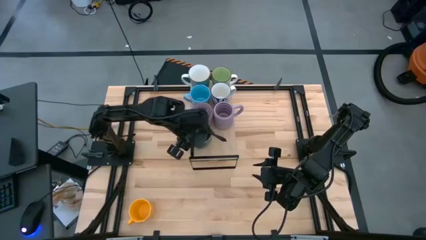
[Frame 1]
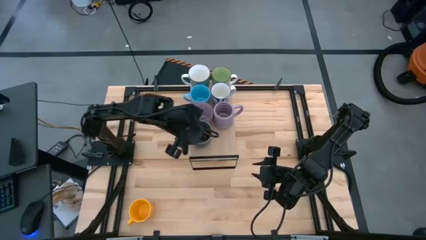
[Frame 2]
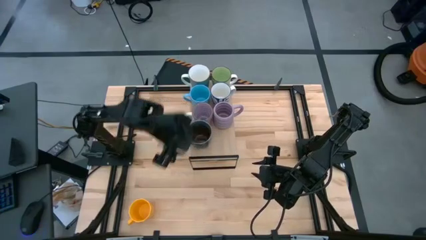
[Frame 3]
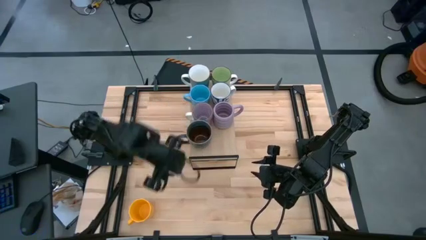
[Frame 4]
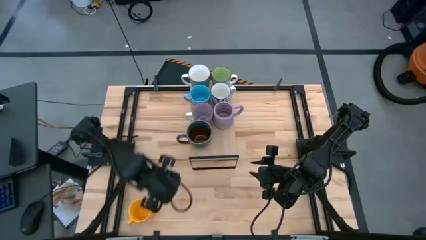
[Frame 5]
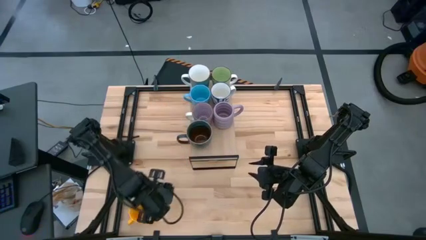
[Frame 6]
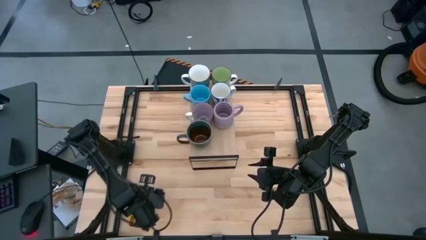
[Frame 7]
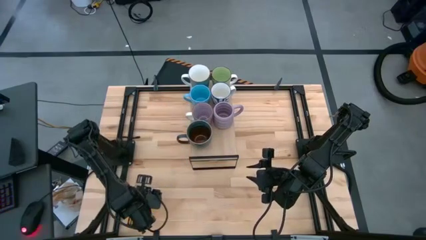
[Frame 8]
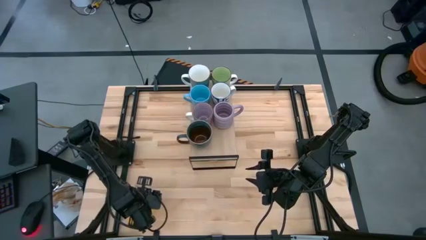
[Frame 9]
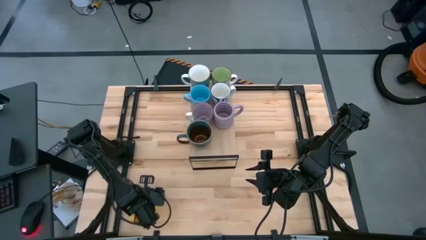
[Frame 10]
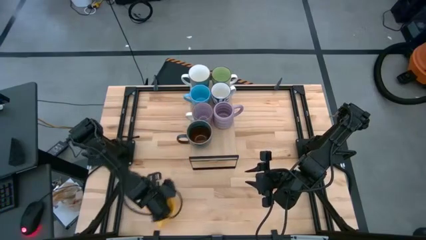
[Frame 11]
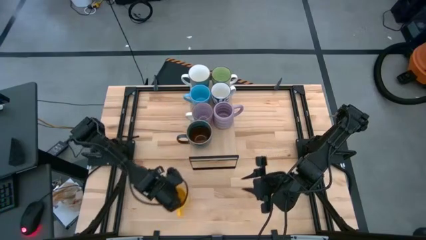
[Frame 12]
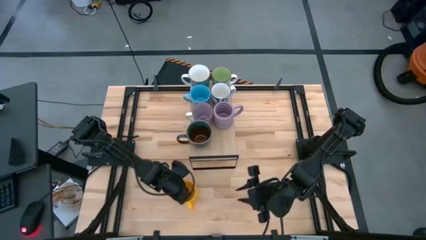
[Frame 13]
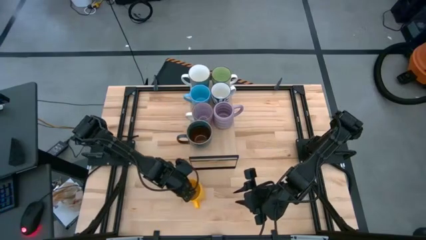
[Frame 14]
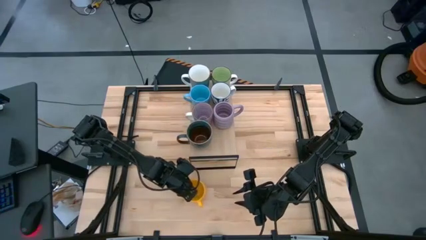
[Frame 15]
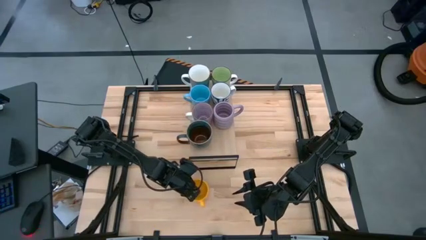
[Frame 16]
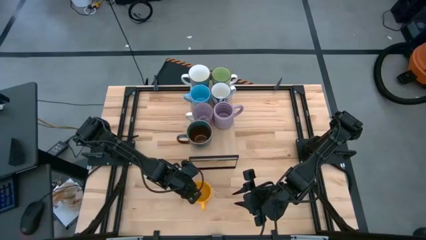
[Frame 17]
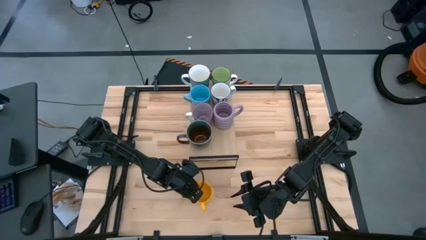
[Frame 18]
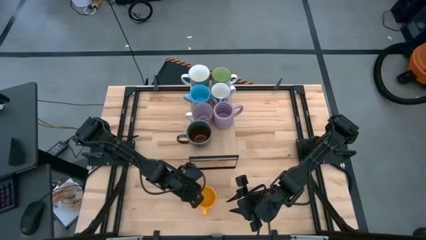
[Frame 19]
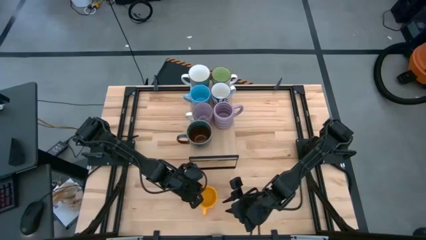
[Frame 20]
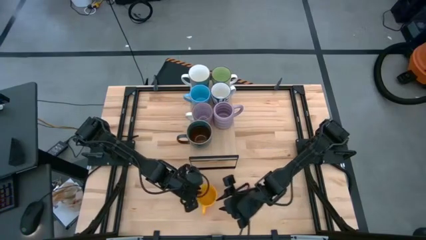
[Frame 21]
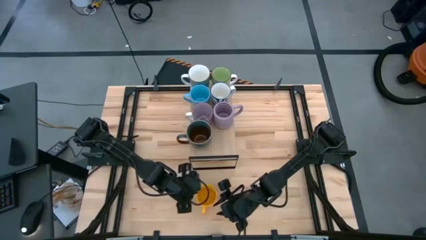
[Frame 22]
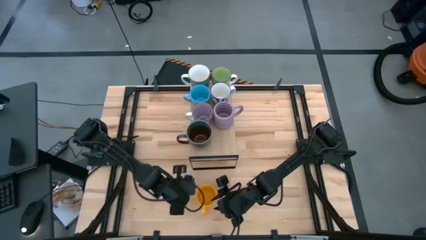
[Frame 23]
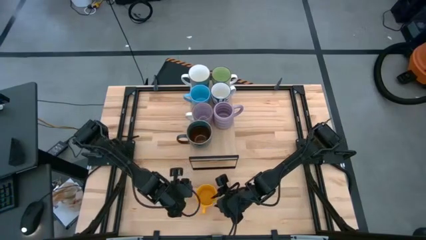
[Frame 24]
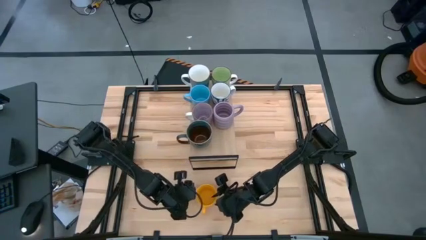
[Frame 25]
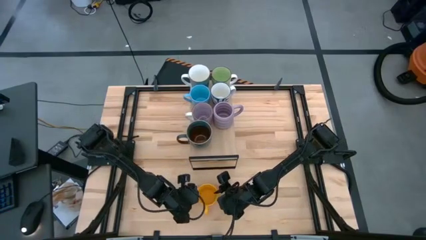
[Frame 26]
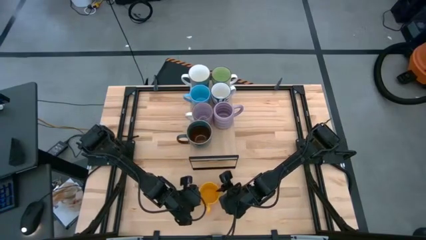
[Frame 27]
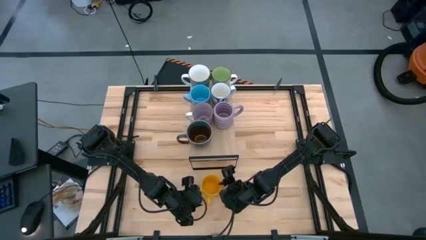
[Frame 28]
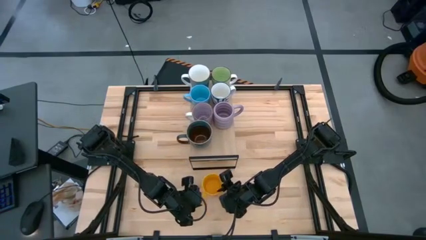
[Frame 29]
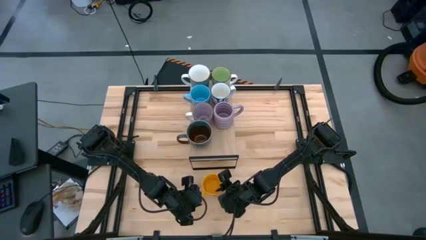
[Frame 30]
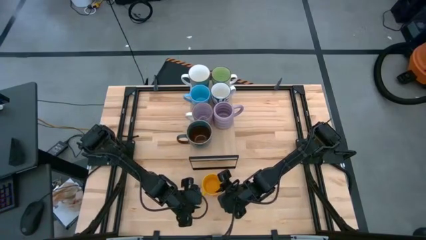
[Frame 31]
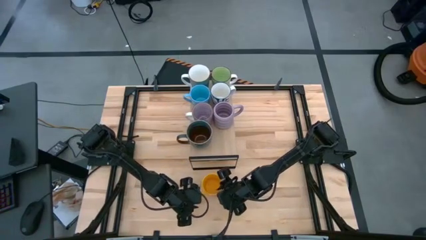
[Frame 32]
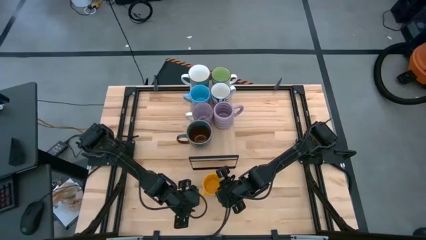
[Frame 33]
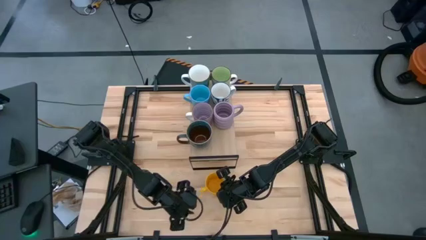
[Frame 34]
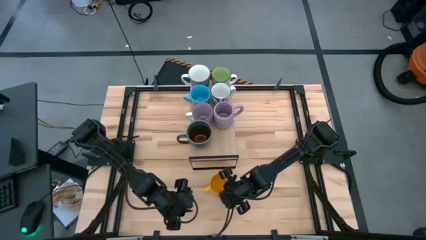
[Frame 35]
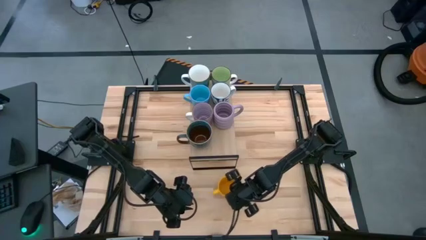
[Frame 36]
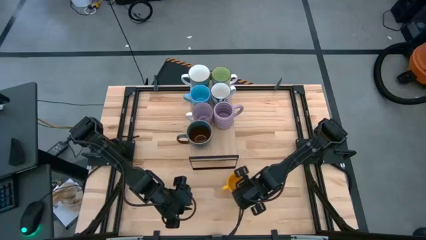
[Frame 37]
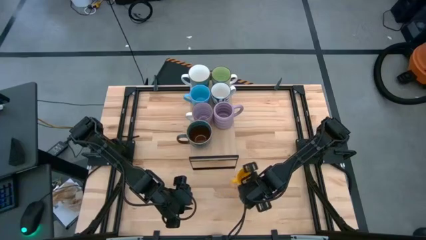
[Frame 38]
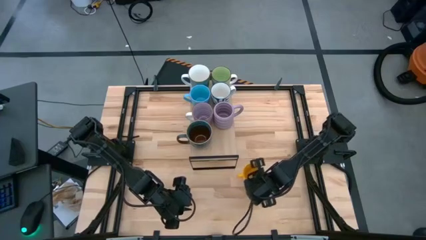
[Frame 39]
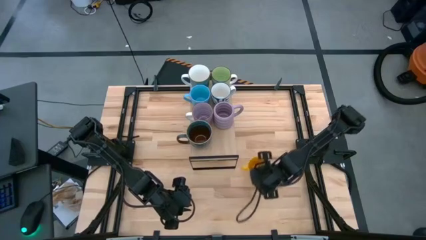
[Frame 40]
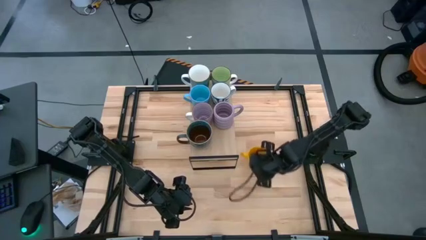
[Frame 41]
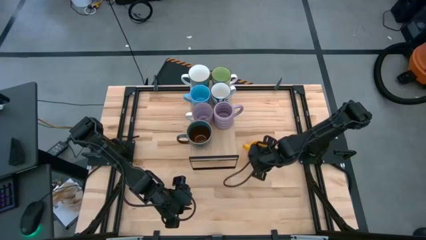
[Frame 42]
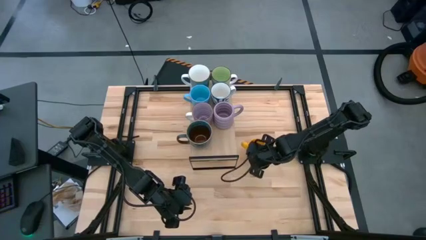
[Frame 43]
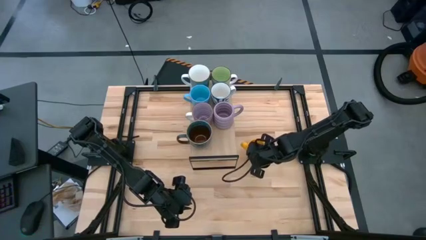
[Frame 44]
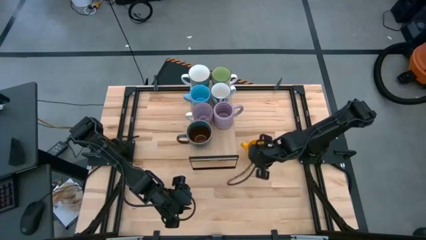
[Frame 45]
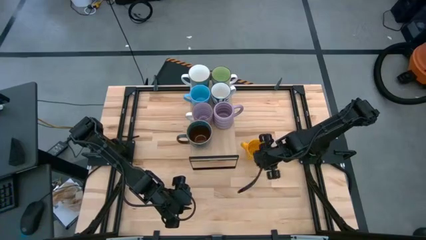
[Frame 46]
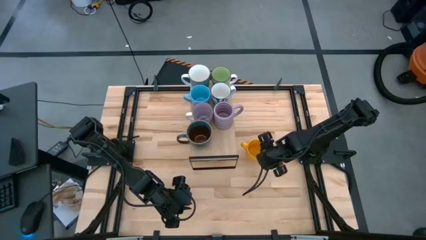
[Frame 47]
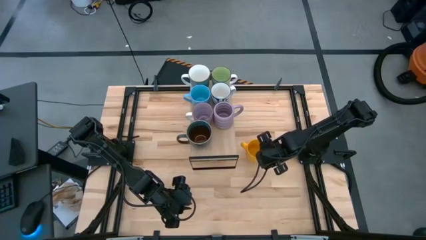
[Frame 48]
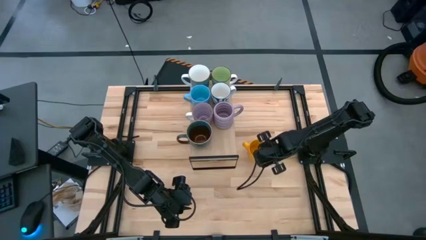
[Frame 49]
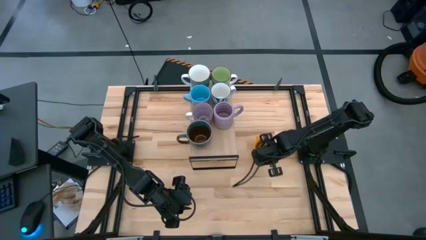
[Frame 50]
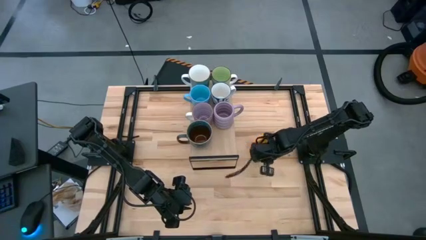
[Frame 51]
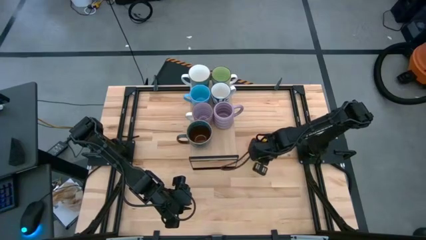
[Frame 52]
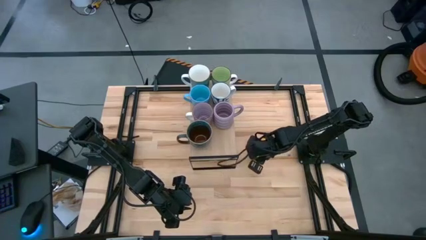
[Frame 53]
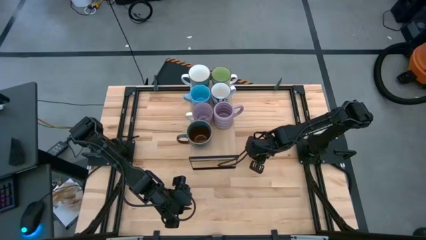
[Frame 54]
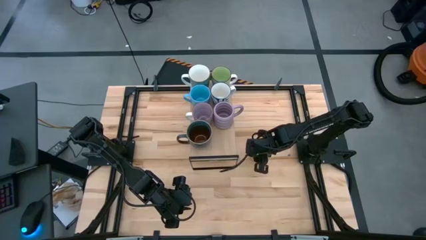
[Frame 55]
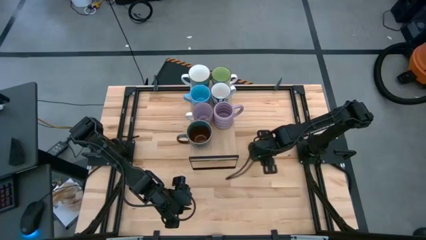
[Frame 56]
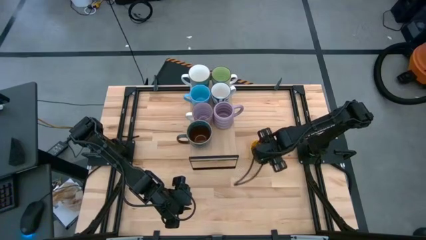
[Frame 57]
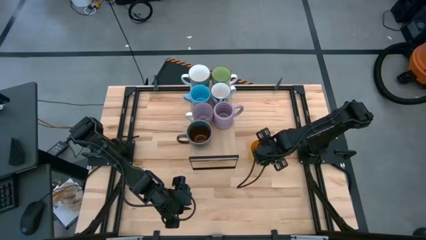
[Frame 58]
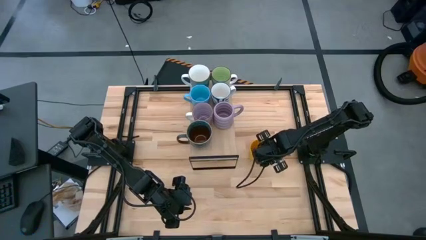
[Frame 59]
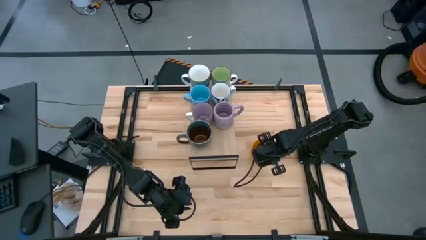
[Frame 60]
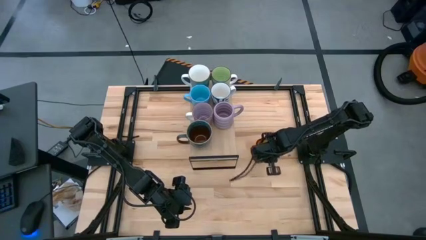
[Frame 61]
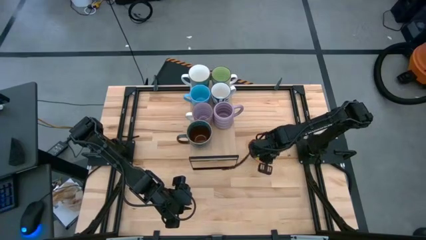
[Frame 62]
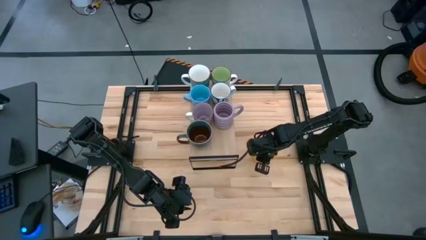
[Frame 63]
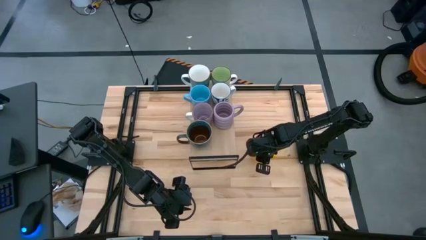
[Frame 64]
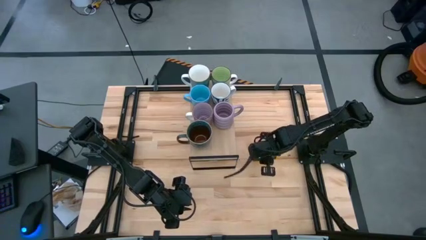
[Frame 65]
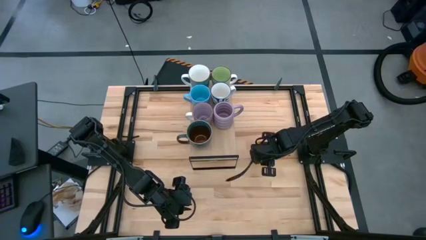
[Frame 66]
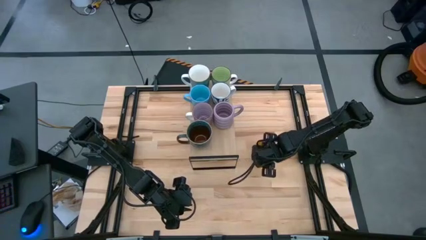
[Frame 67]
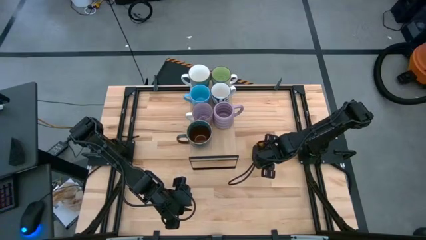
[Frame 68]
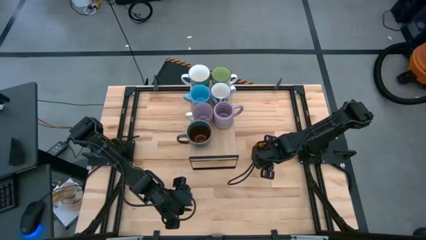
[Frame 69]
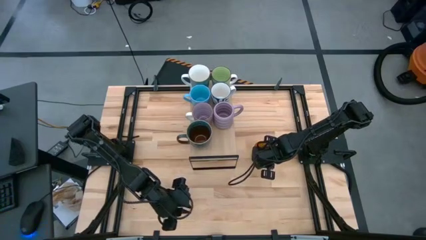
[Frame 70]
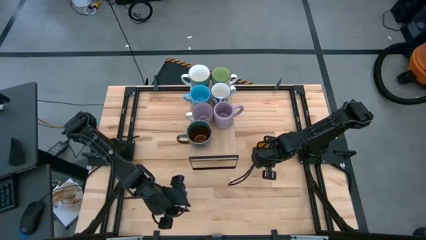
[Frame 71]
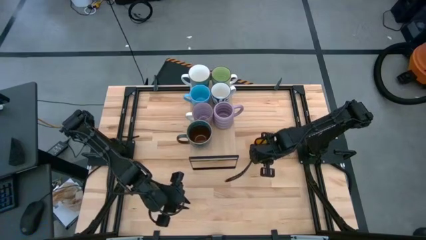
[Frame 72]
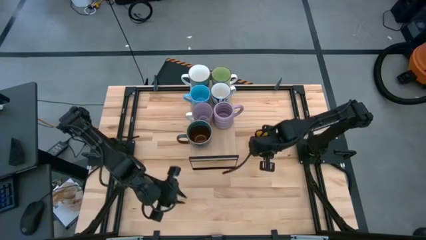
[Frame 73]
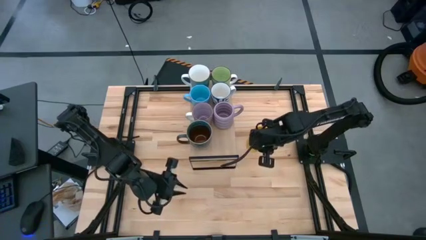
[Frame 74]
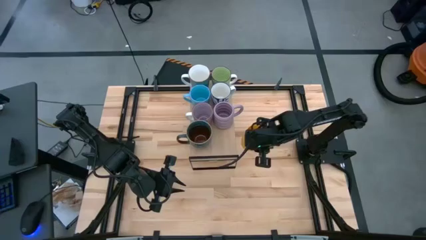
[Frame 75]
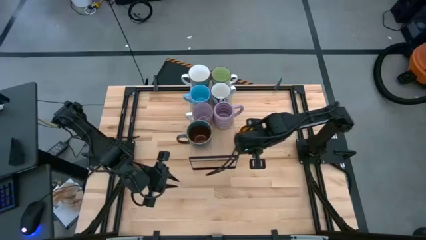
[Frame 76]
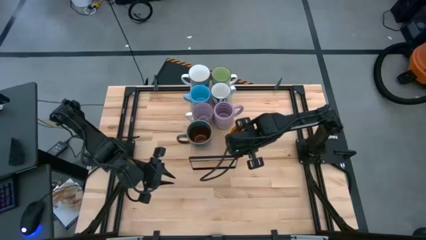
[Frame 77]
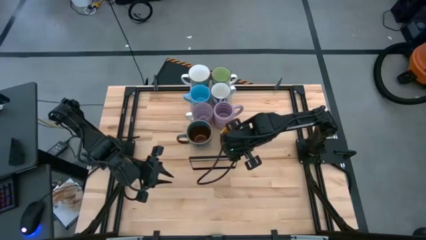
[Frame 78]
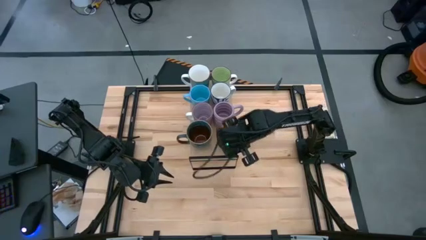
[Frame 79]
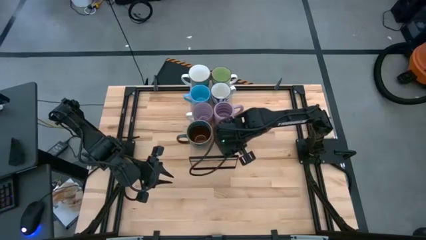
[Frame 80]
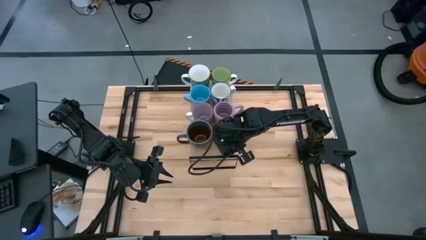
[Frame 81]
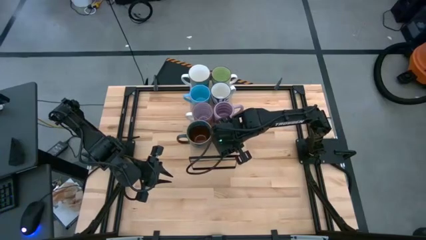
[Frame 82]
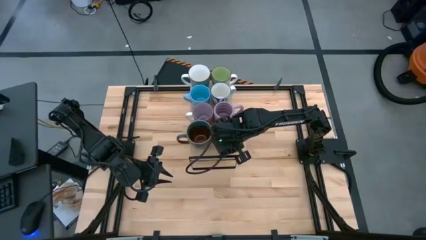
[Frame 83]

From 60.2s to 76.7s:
Task: Place coffee mugs
Put the yellow mug on the shelf
